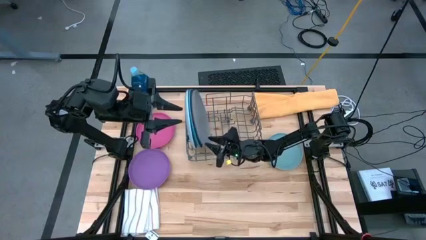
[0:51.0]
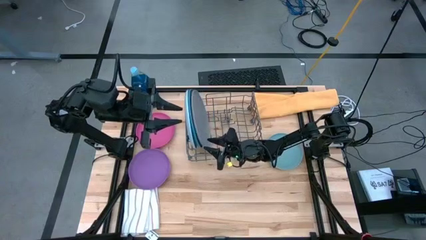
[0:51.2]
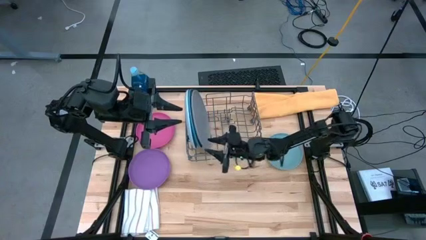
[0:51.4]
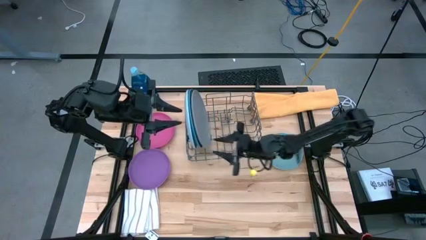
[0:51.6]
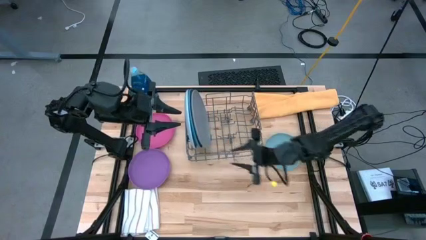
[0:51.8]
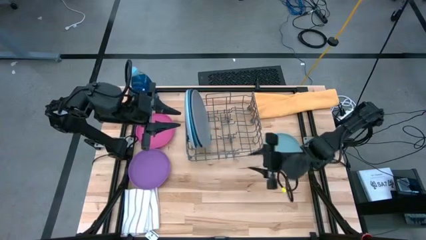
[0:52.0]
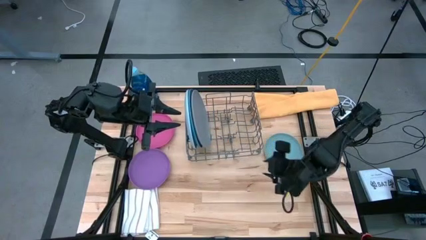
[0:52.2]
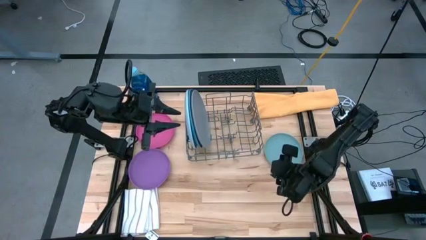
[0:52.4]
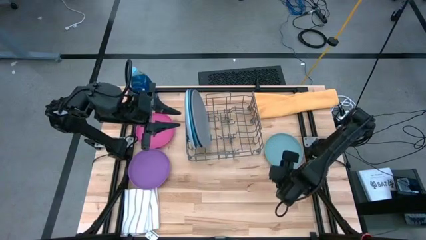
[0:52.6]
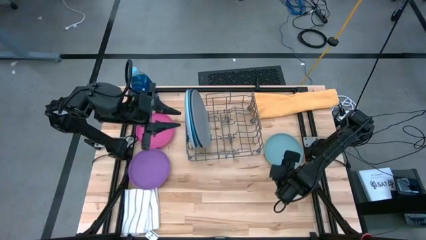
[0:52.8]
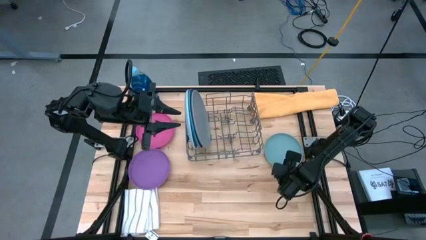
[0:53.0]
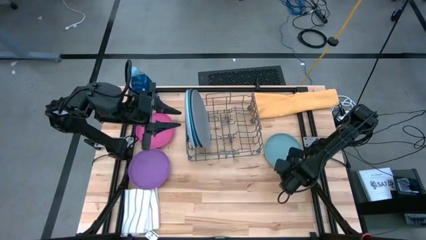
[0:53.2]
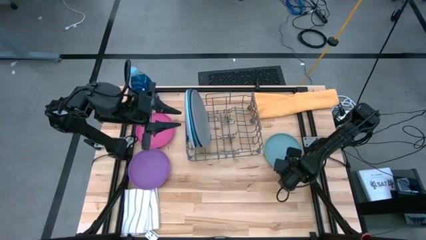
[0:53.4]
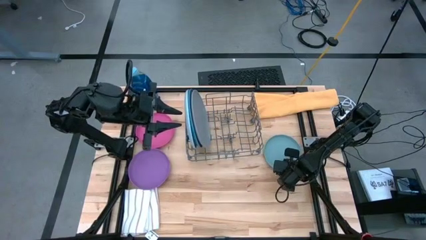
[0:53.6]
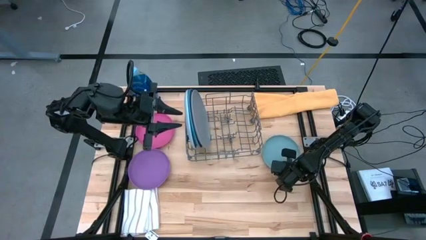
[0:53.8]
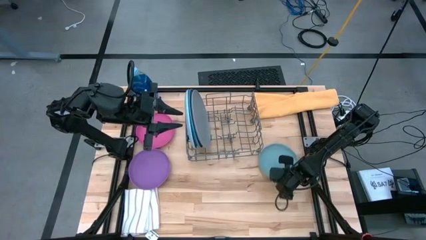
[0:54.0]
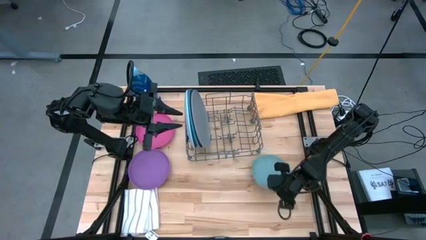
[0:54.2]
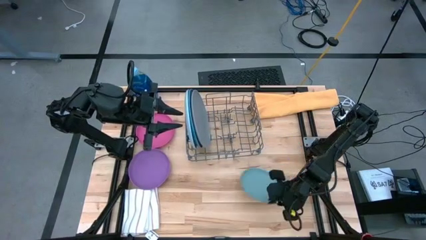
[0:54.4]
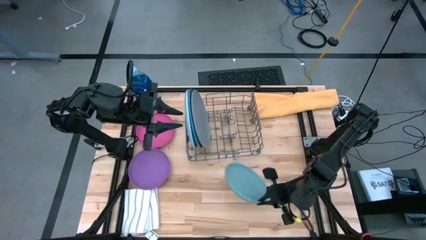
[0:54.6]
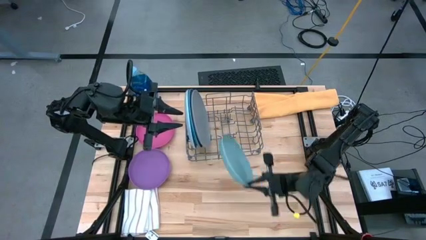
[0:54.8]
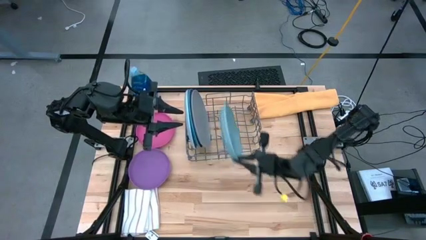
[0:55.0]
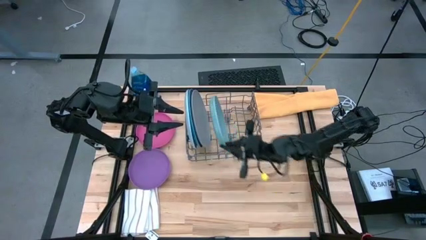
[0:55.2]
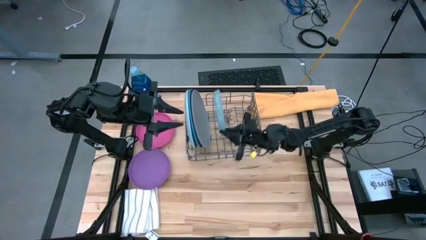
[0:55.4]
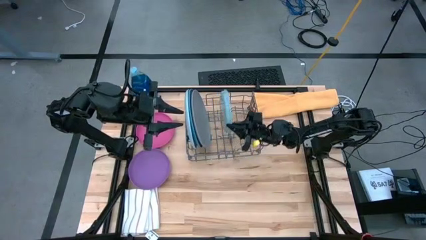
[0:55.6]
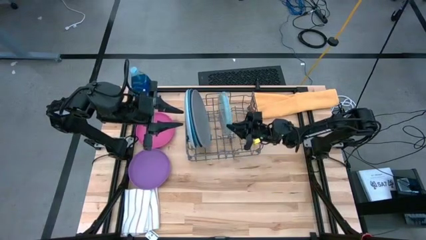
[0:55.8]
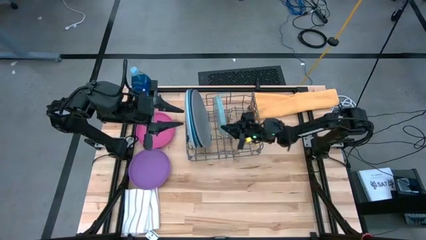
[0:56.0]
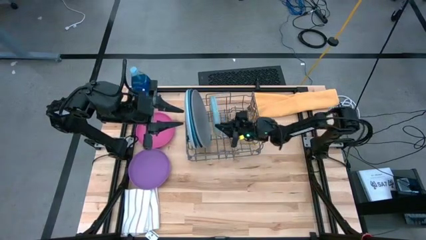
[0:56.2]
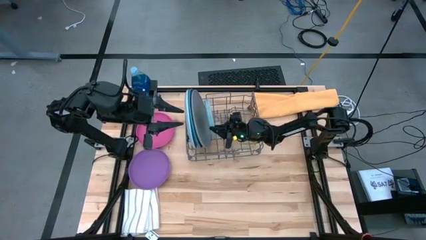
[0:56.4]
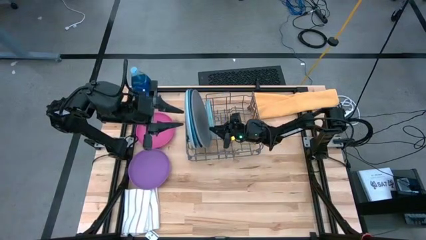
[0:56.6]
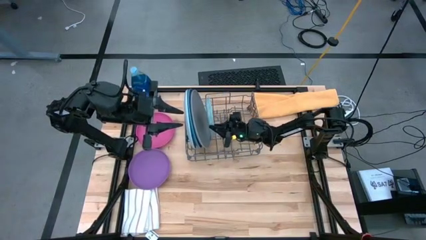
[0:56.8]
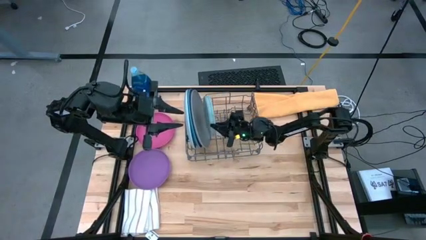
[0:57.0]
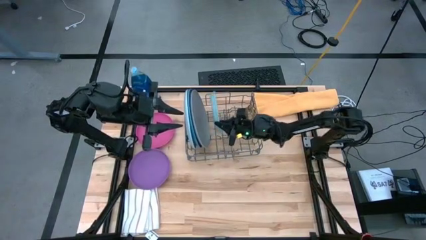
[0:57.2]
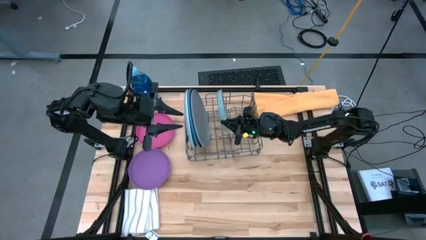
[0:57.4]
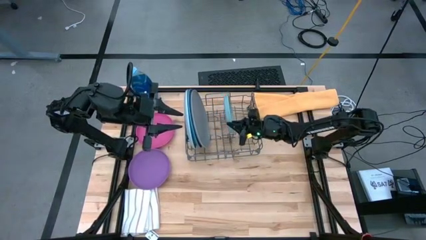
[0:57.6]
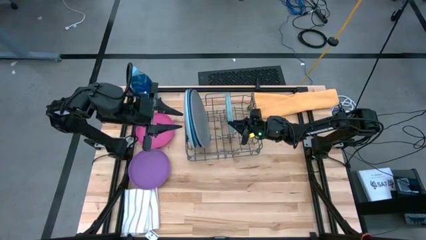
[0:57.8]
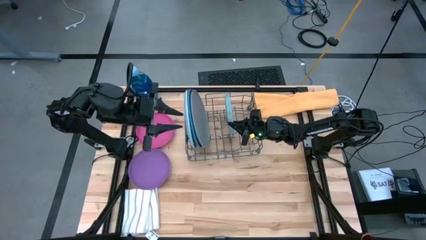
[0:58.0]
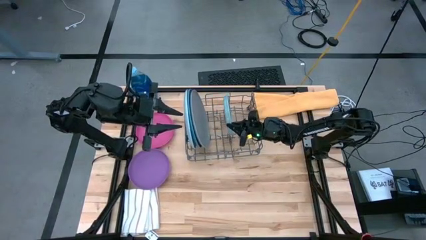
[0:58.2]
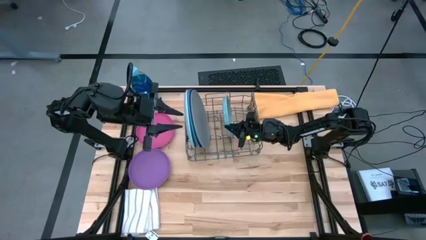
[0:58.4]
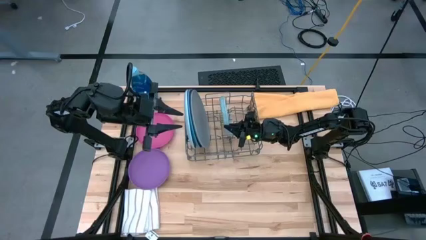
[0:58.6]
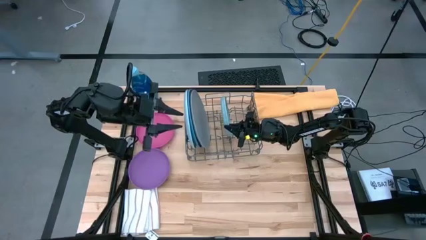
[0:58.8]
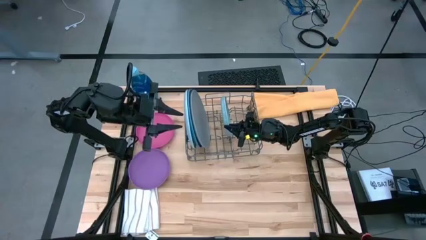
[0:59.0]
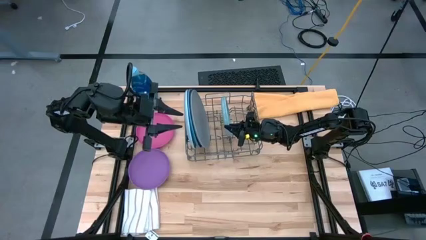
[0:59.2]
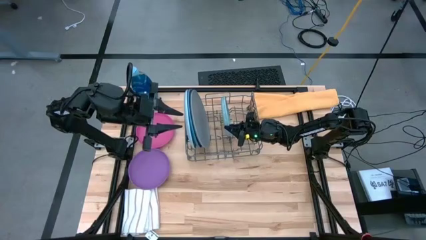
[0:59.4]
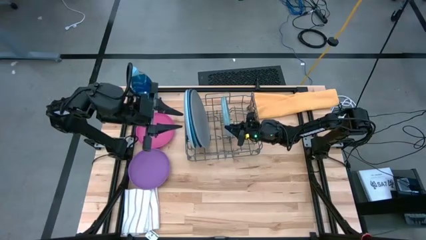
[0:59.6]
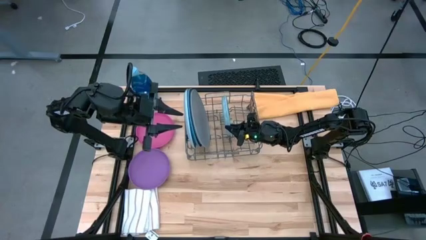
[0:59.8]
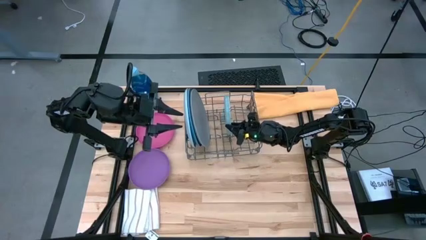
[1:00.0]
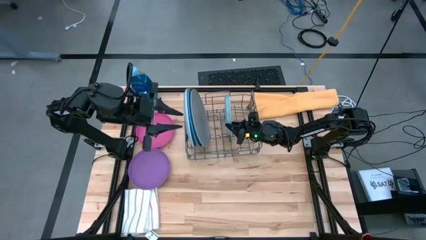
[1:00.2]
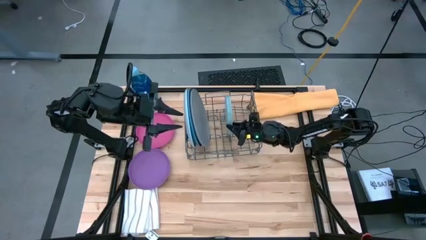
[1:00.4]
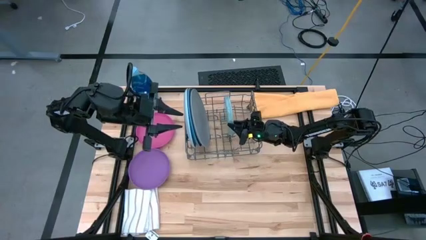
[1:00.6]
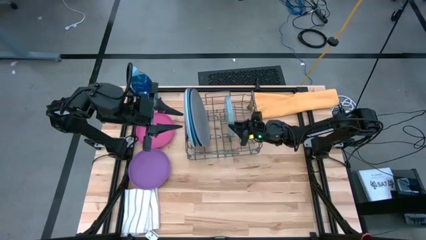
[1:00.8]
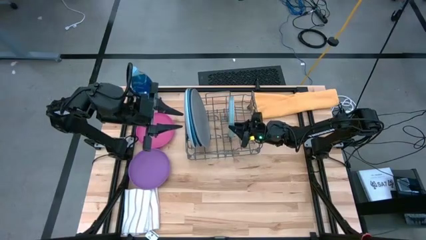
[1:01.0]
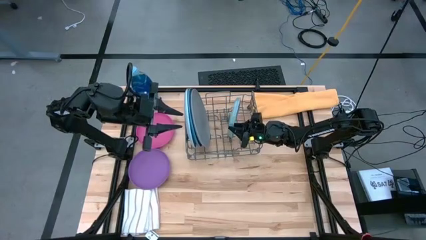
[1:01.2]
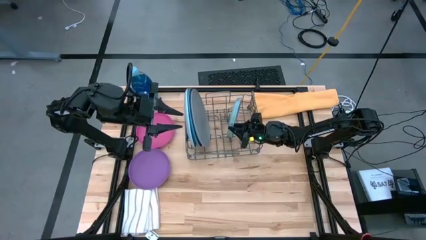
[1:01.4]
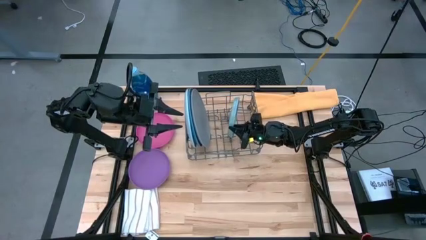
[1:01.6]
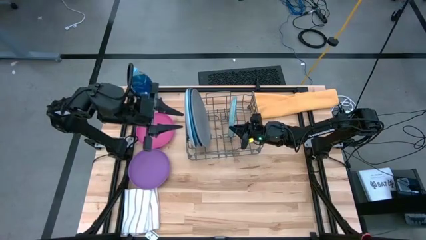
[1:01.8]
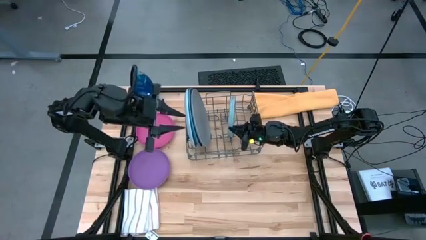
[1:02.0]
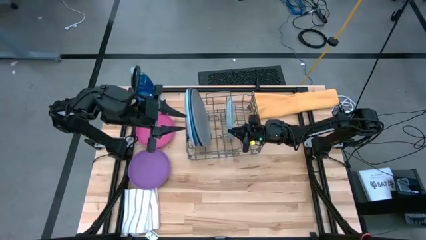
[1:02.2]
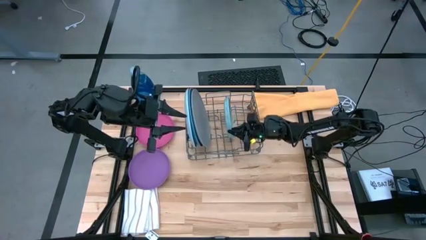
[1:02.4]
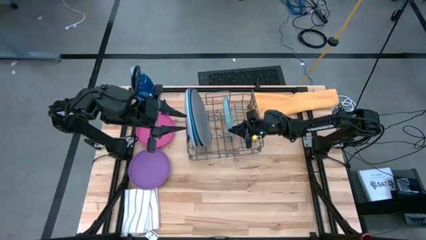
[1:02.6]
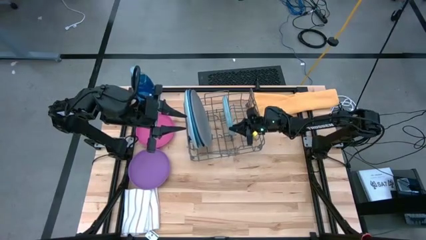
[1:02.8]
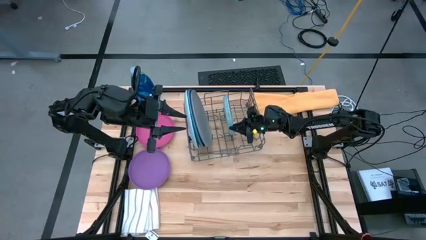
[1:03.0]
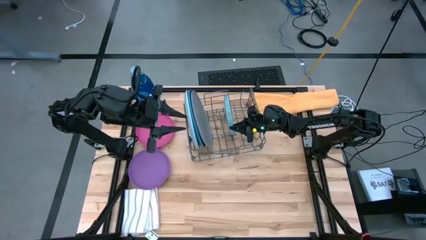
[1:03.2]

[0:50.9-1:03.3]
Task: Sort dishes
Put the light green plate into the dish rack
